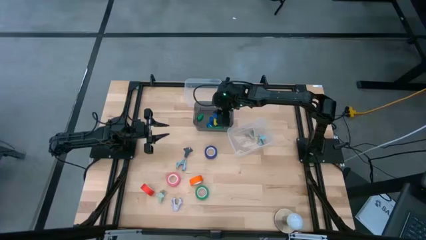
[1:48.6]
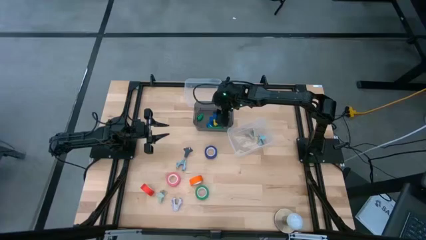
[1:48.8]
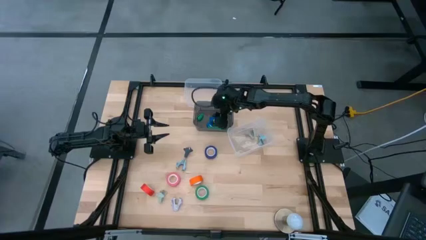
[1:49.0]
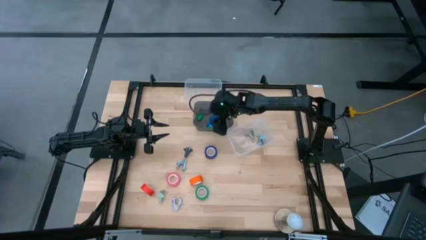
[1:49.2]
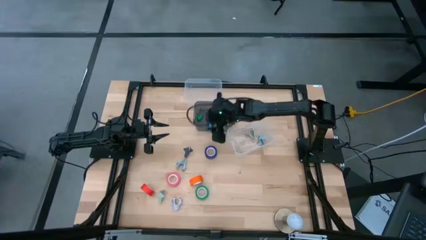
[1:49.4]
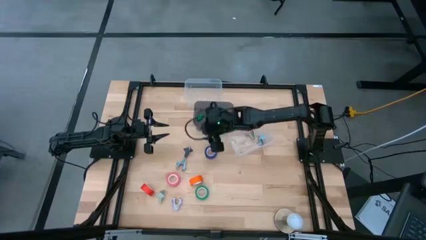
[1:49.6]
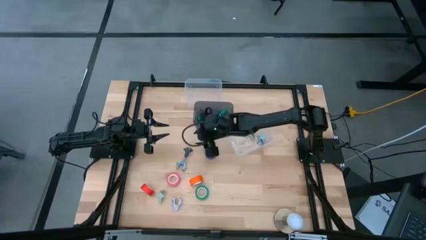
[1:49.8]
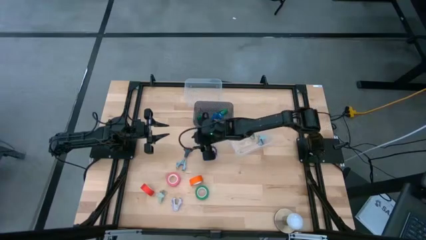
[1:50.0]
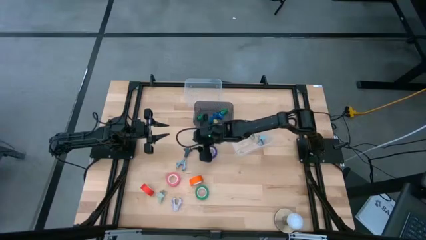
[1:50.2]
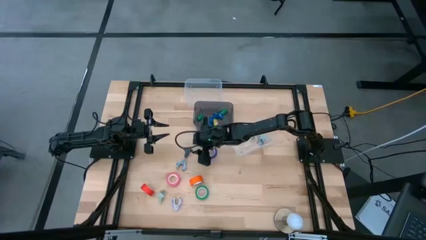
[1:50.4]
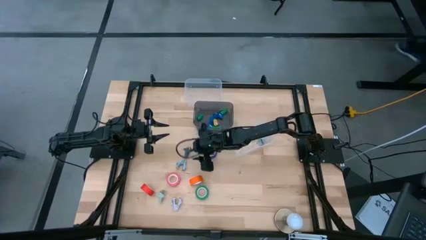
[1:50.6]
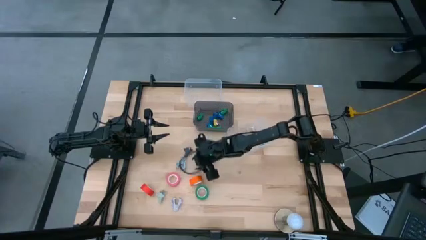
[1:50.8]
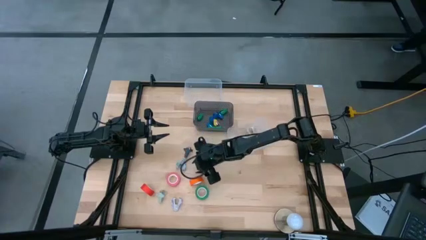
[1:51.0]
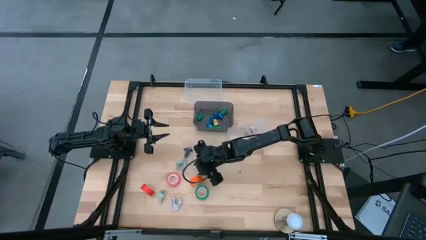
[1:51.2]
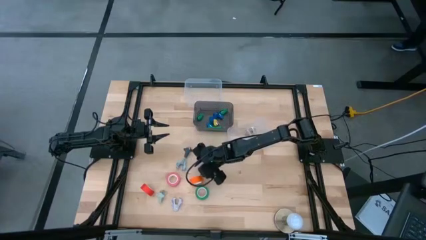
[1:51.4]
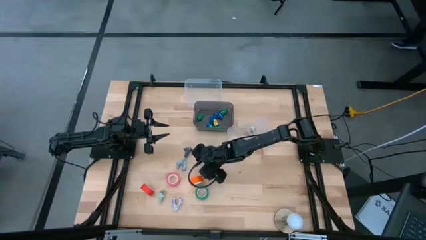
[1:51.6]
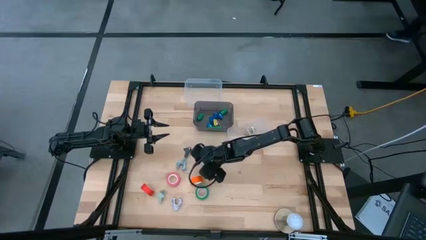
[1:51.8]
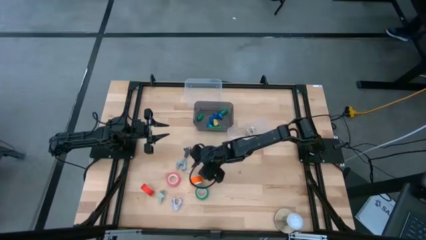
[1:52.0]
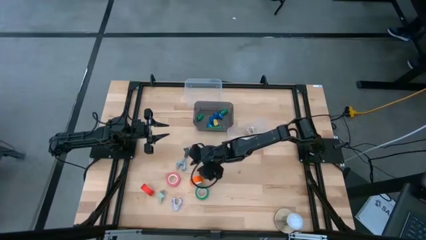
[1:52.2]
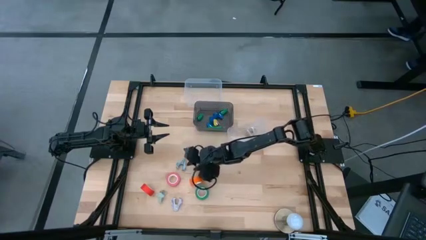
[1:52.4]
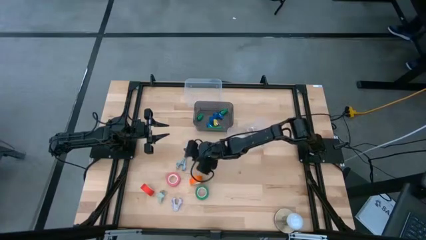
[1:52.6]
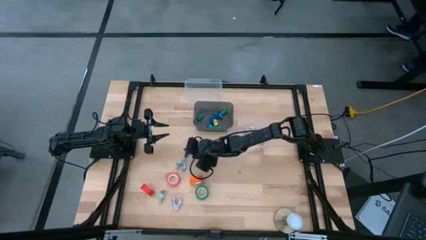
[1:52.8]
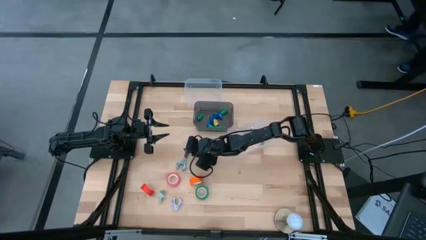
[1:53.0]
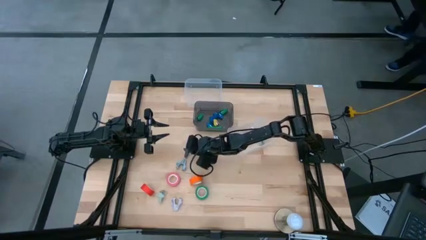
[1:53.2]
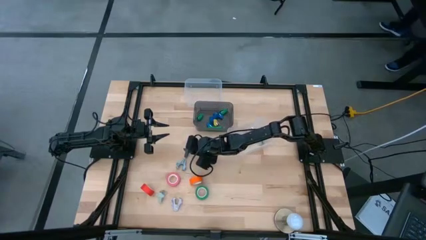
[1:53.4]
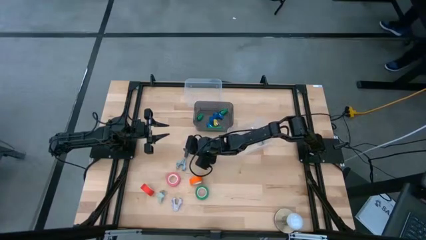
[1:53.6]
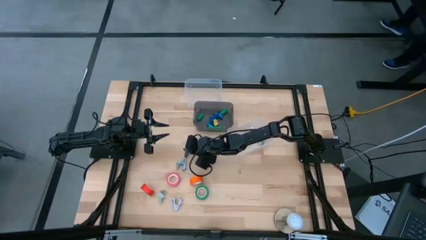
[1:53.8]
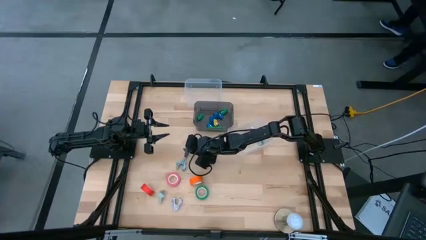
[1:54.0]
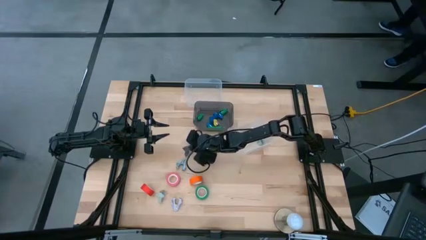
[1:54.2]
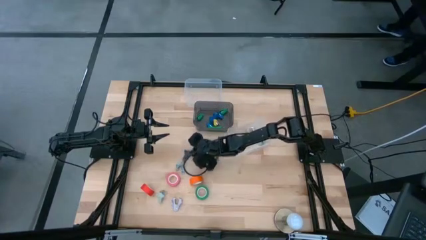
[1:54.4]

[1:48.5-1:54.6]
Task: Pick and place Stapler, Stapler remover, tape
Put the black staple remover into the bottom transparent bin

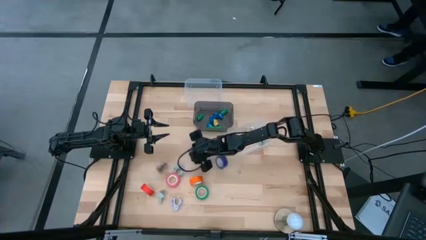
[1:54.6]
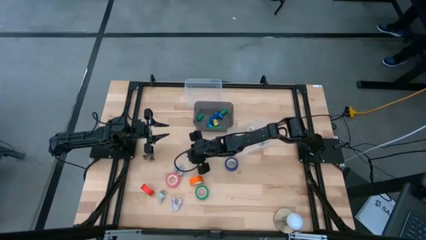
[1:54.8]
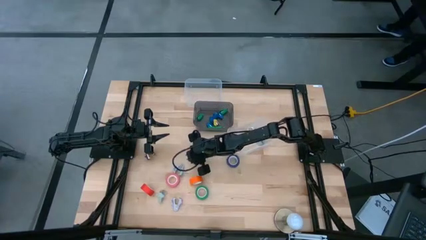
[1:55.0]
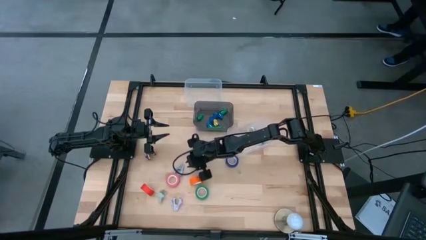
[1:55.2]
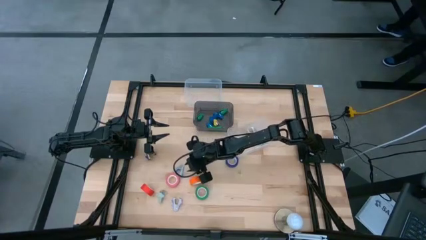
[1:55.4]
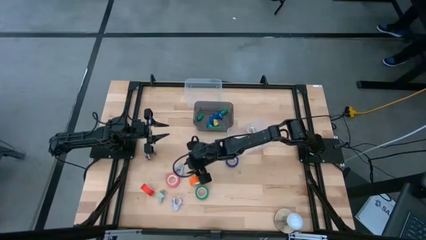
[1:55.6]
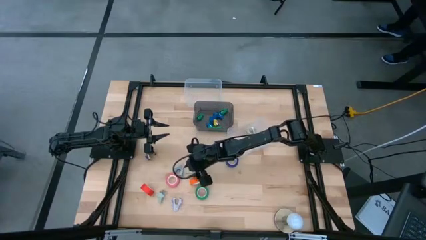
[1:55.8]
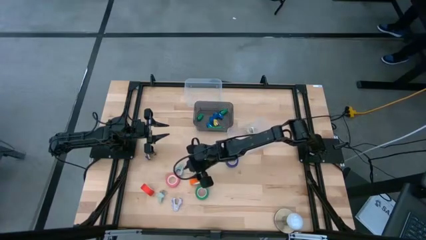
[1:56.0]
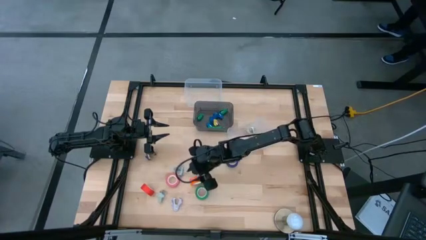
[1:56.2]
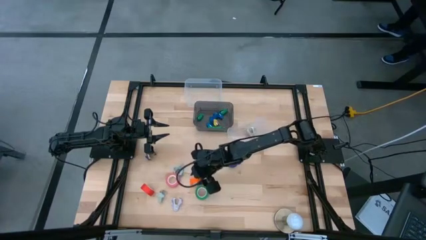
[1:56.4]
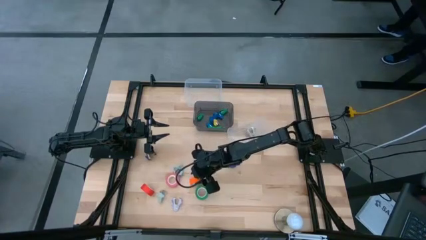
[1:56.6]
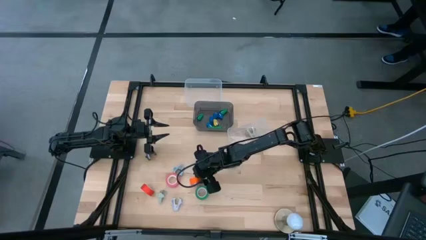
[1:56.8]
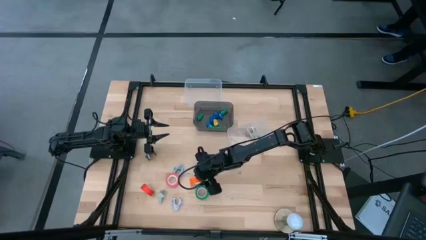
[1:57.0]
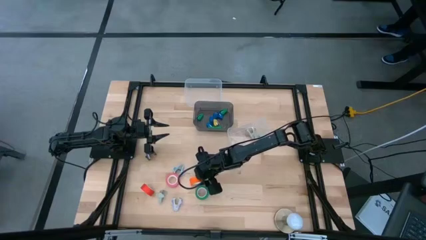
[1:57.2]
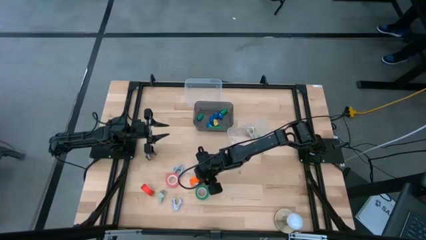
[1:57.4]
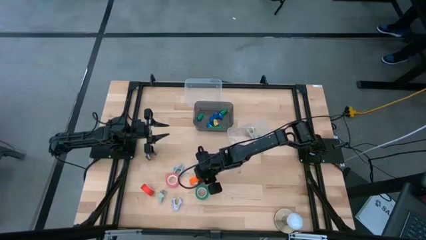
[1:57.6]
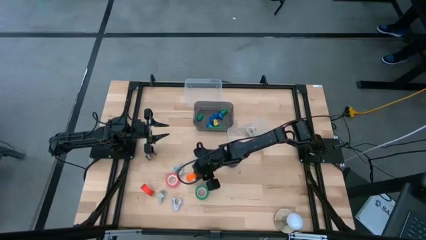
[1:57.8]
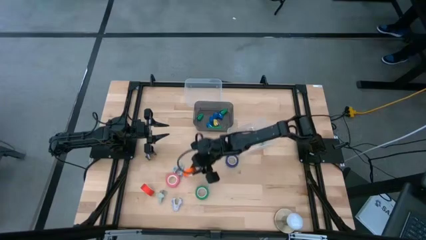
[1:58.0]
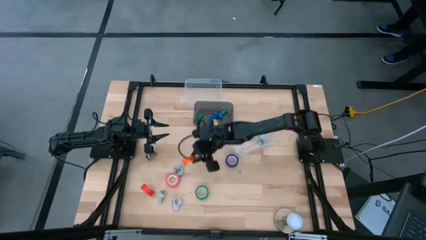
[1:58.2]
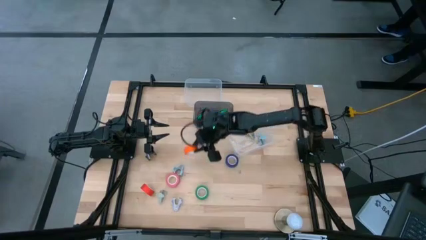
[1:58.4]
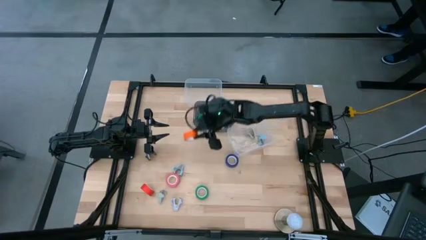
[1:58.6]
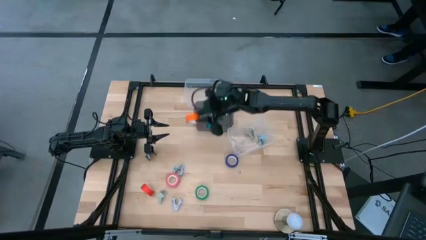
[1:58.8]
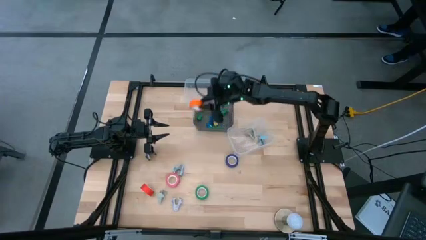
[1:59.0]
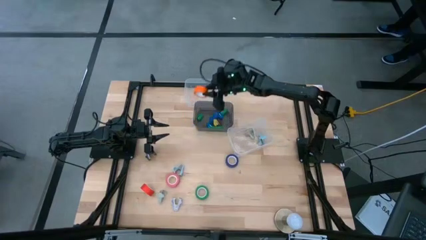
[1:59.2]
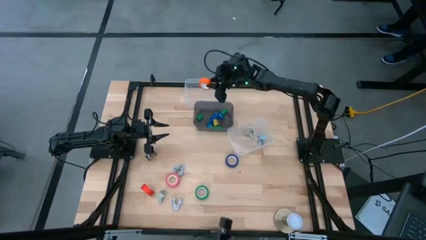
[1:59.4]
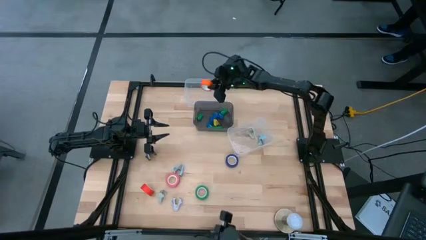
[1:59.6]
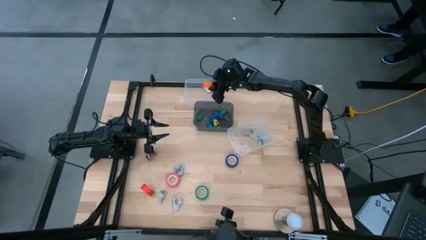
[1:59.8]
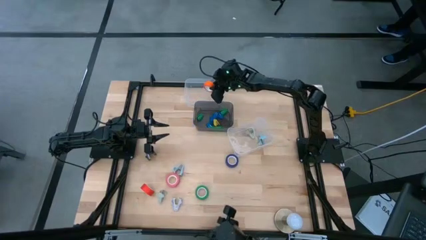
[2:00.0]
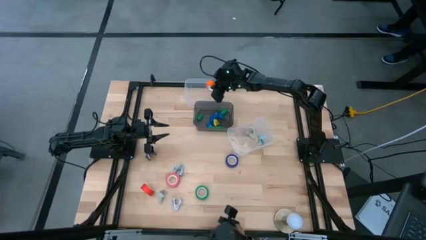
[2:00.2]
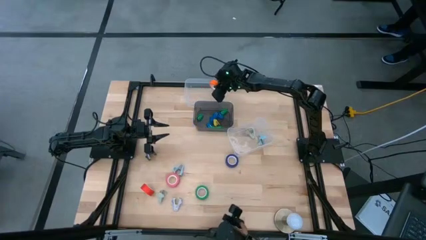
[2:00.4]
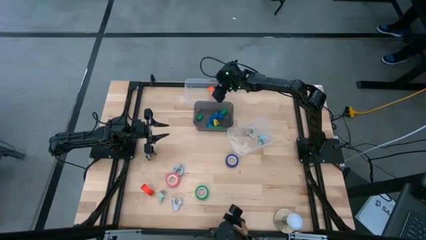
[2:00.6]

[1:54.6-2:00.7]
Put the orange tape into the top transparent bin
